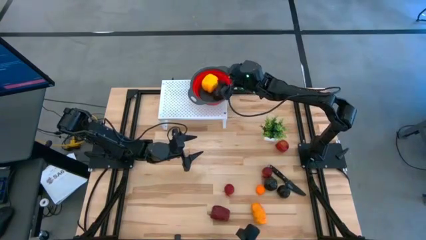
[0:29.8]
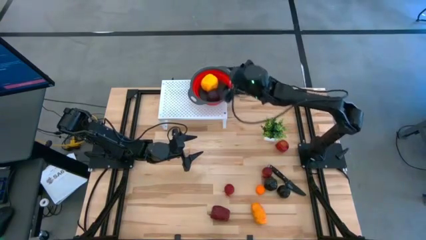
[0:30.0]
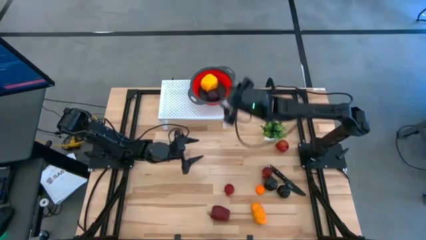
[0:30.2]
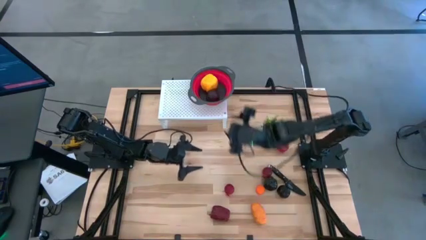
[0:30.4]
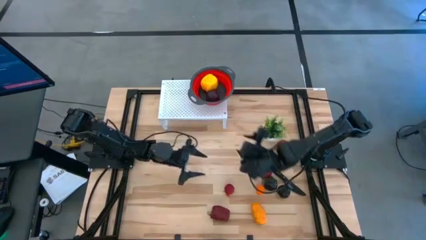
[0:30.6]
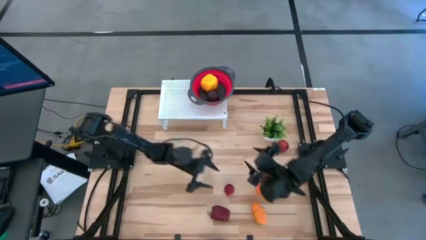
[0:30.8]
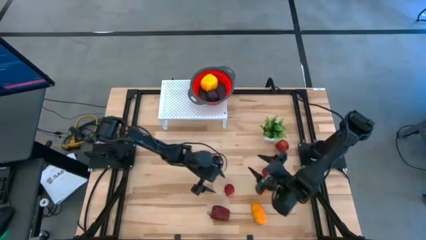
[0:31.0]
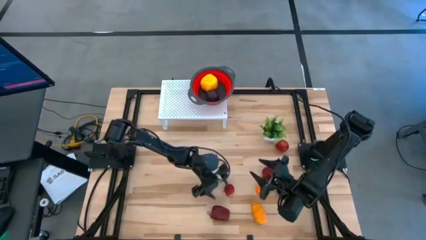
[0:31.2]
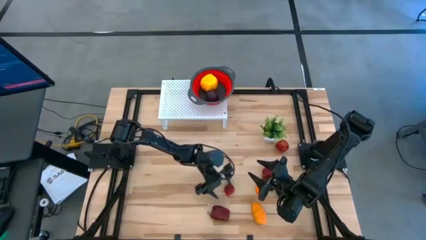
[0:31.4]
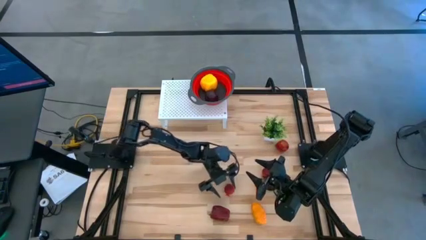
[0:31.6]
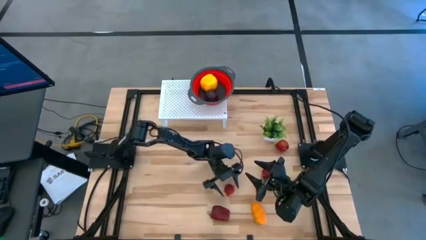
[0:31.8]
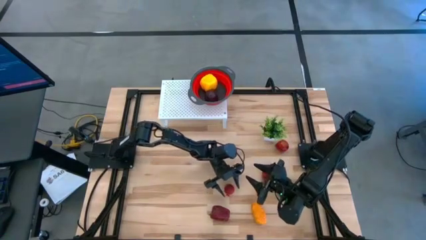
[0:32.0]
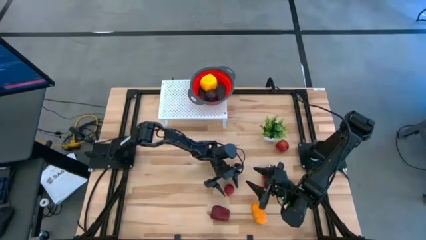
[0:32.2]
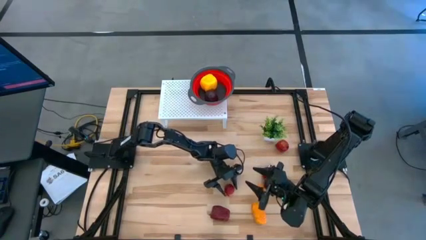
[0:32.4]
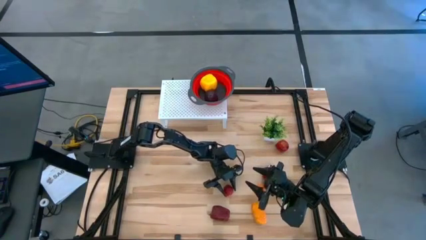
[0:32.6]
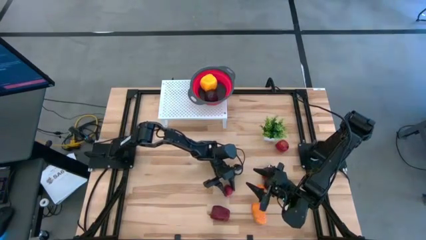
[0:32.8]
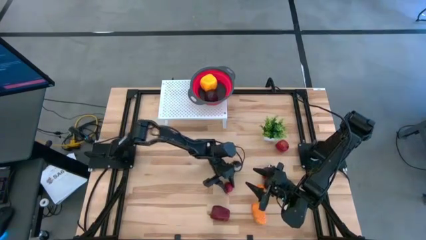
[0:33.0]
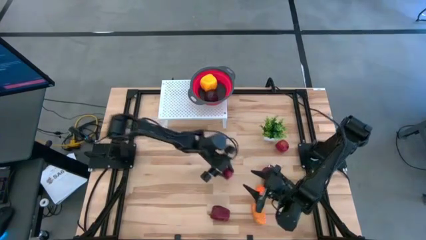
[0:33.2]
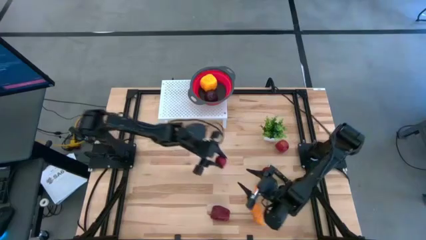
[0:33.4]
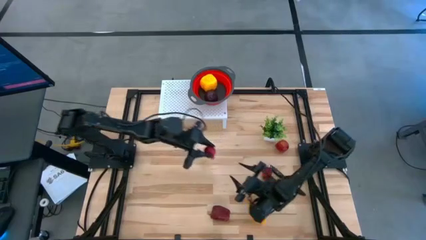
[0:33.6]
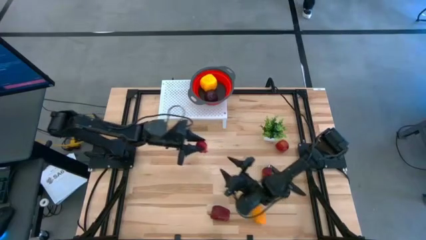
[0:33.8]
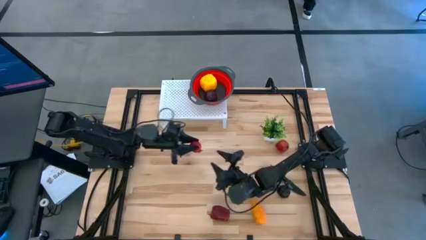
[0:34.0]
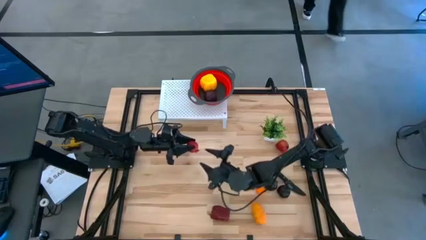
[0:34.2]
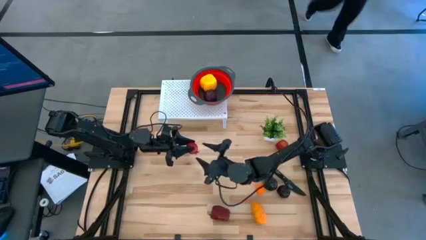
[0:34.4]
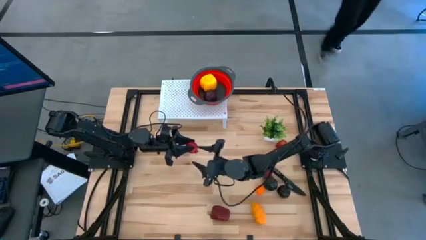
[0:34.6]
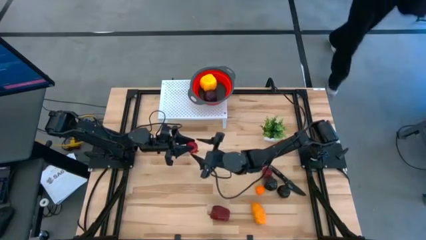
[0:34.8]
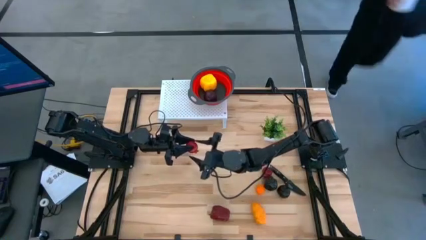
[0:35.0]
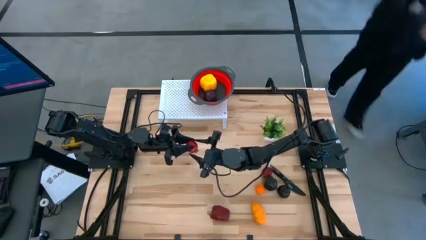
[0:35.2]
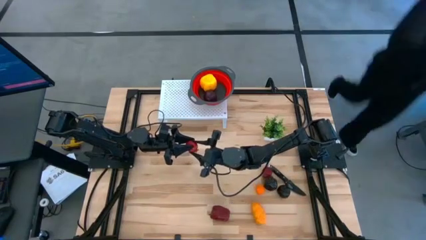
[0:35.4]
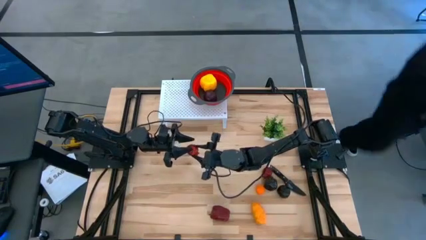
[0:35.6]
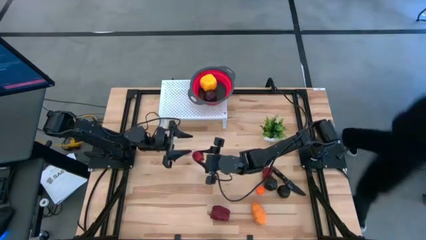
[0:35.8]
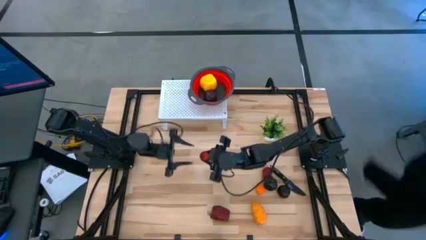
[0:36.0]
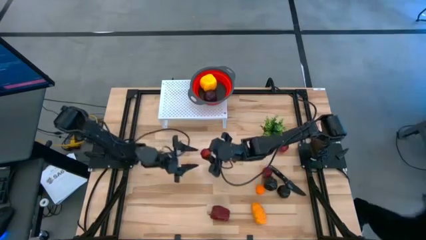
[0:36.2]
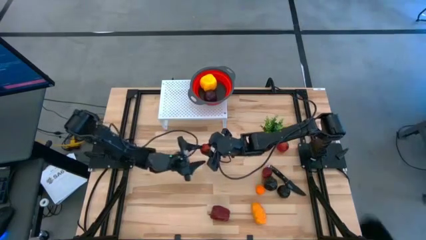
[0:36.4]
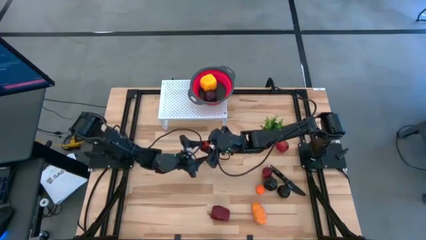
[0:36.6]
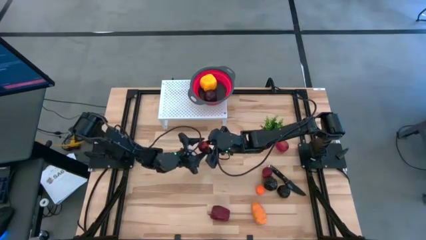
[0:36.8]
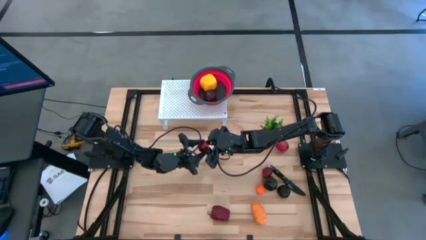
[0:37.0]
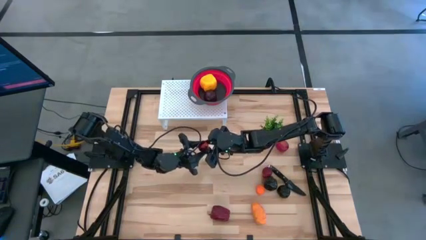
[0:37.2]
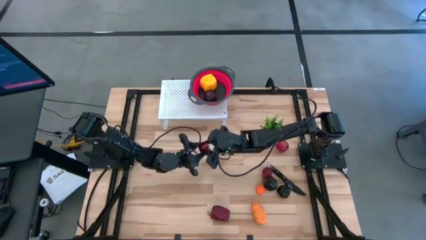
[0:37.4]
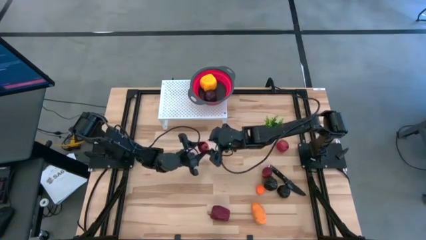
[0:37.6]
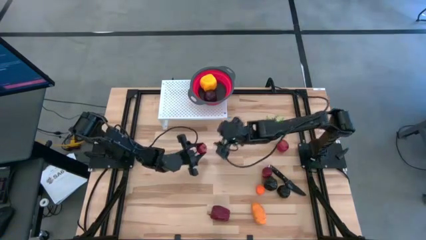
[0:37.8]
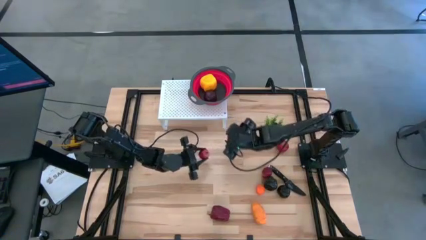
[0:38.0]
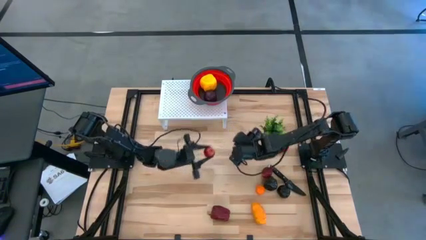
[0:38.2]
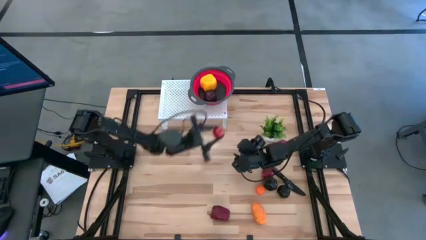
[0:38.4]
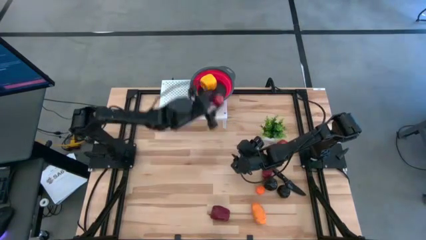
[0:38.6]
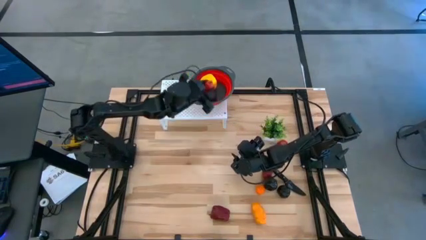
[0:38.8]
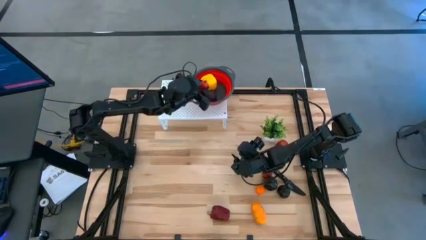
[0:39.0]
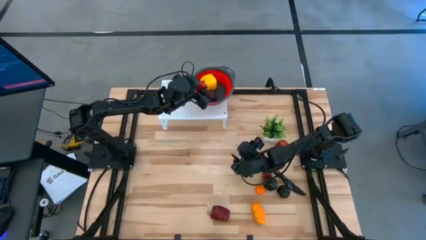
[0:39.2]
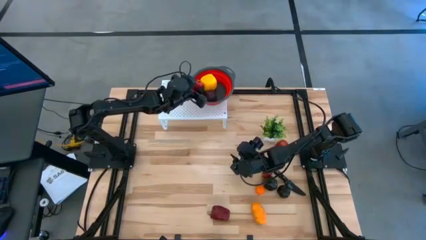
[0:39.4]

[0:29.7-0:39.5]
Task: Pick & Place Fruit
Put the bottom red pomegranate into the red strainer bowl on the shelf

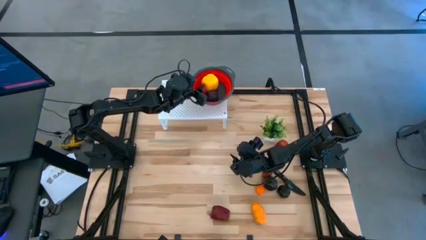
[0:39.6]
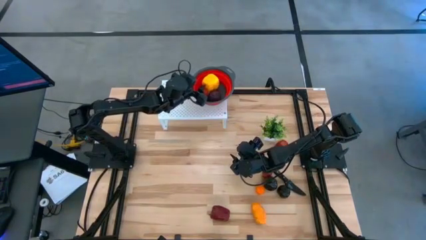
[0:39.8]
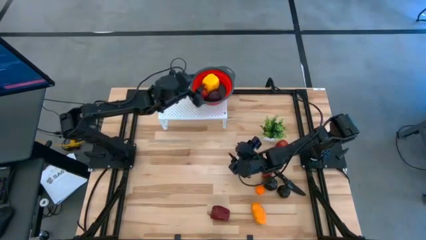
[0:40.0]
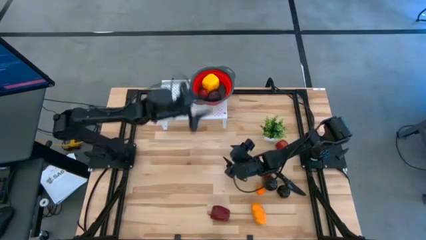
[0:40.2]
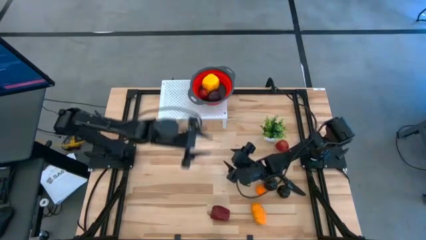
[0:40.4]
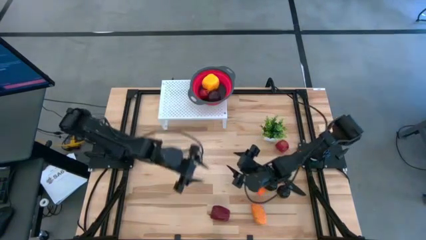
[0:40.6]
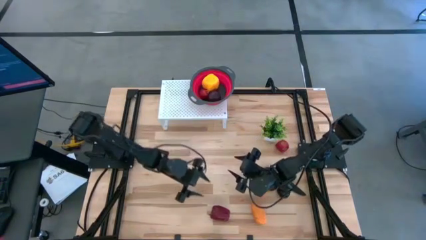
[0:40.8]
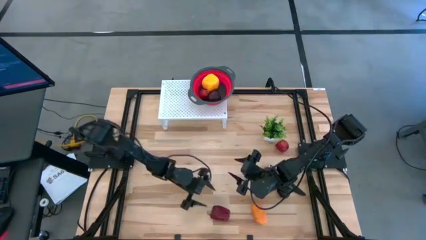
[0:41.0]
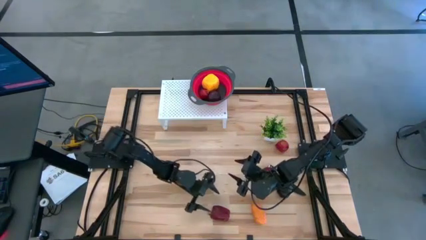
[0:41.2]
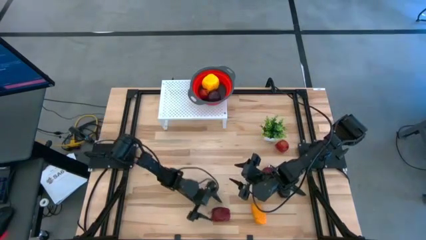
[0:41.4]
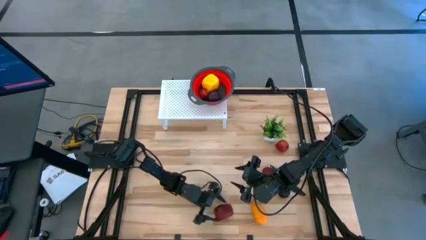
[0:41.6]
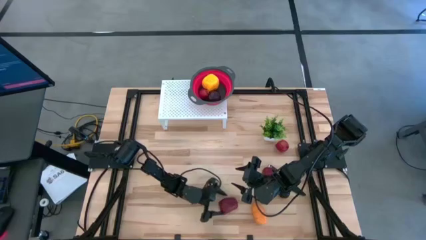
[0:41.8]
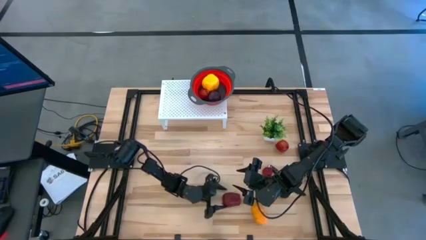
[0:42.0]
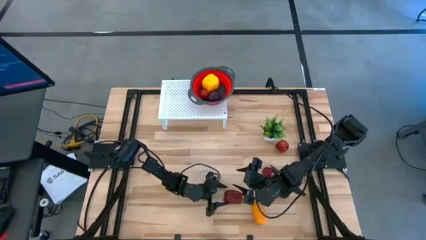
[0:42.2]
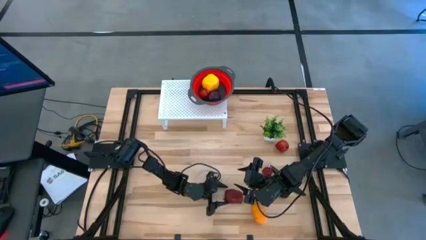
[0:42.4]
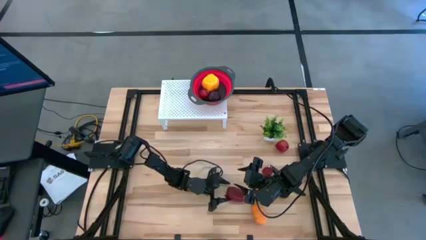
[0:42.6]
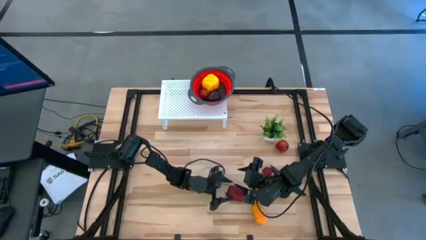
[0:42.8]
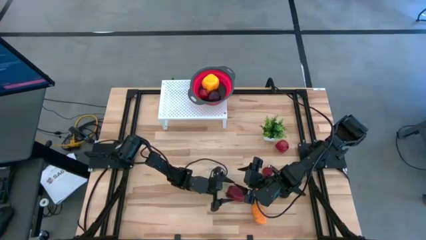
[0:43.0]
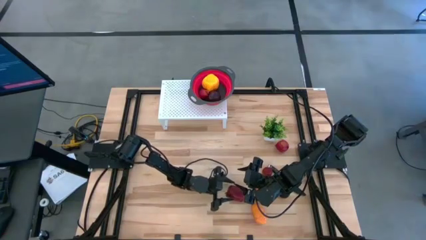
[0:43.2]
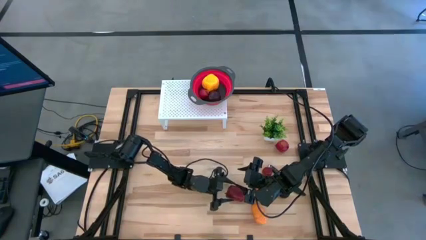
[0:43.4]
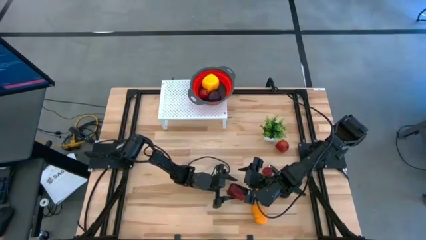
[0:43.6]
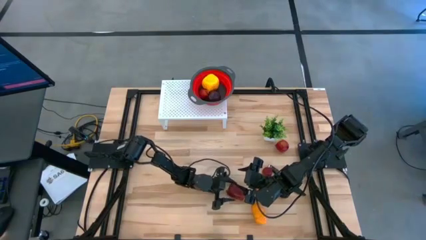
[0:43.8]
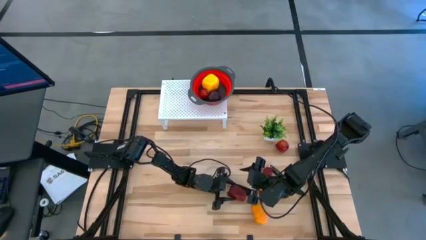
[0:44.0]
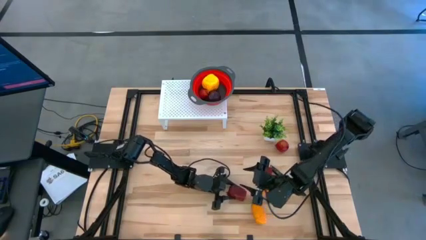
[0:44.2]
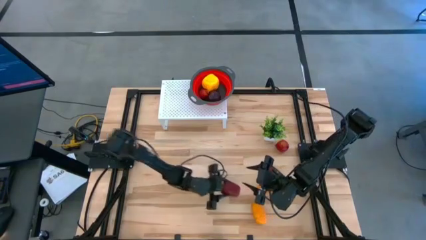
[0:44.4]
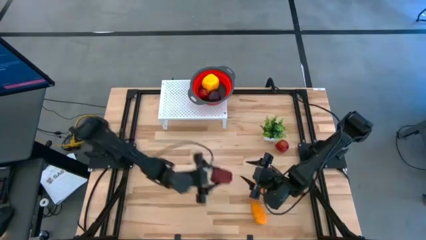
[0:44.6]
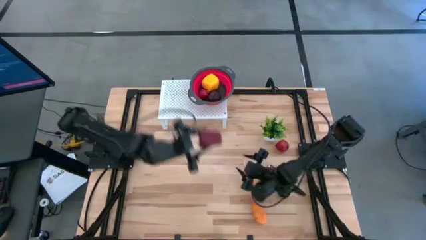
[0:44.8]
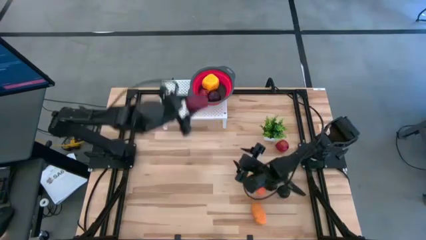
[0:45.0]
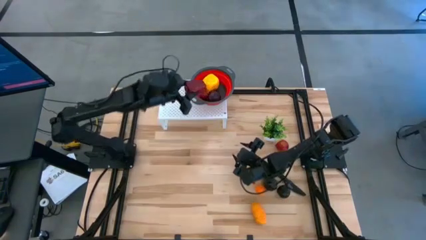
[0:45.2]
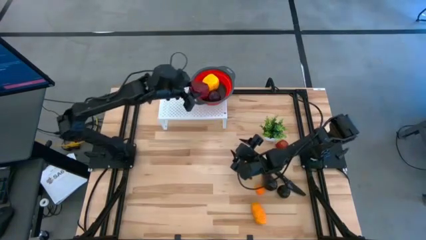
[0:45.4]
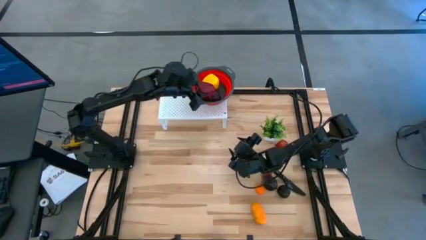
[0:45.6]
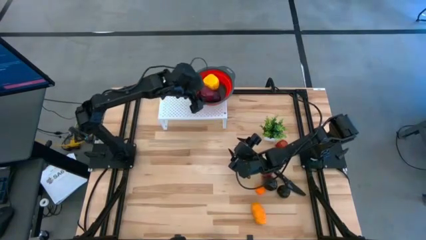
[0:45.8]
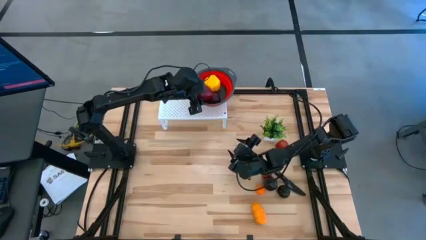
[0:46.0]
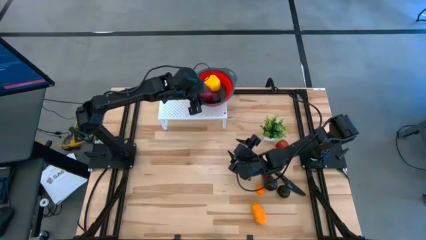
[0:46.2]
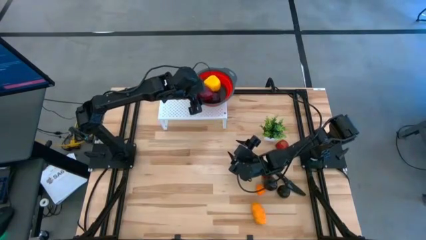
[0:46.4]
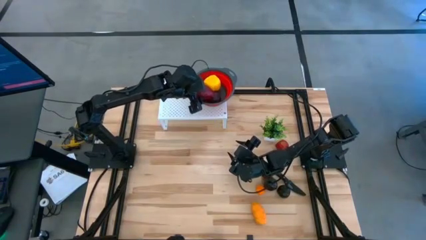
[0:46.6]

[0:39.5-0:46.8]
Put the dark red apple into the red strainer bowl on the shelf
